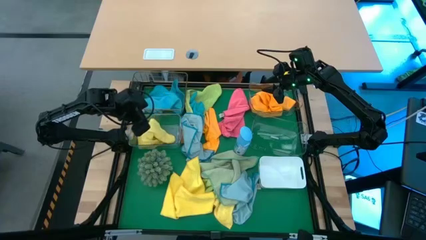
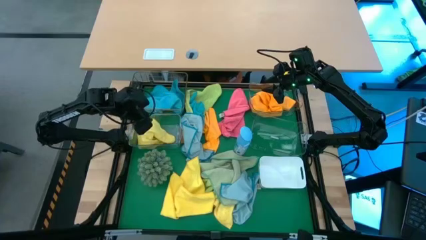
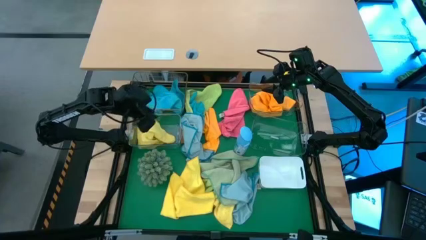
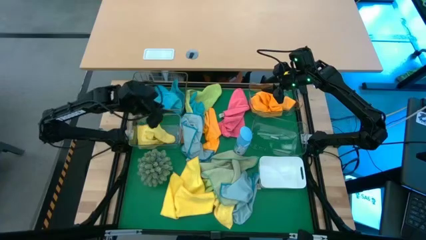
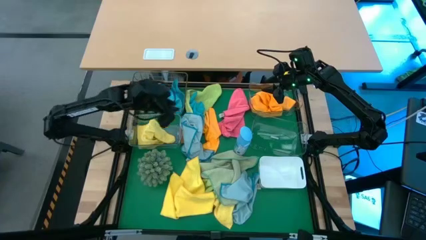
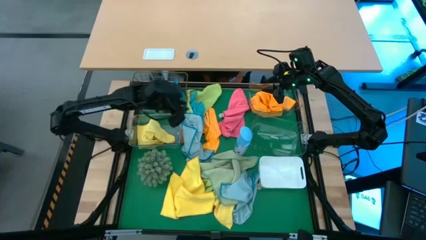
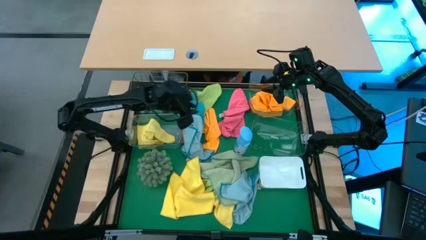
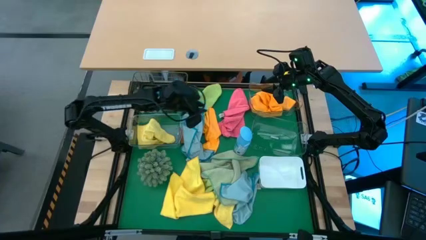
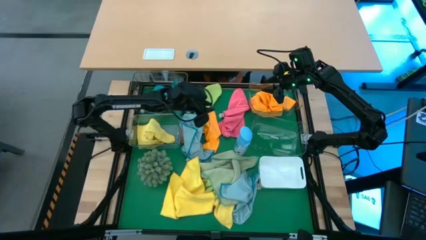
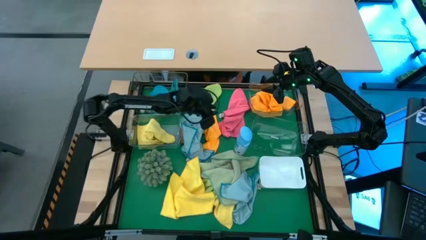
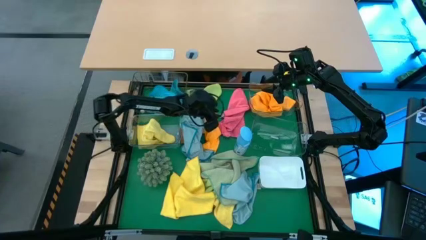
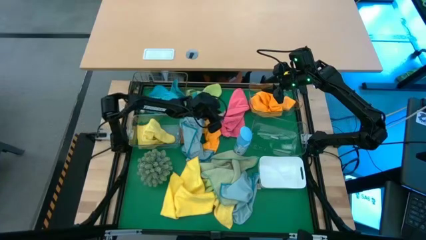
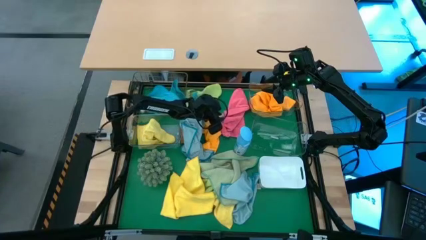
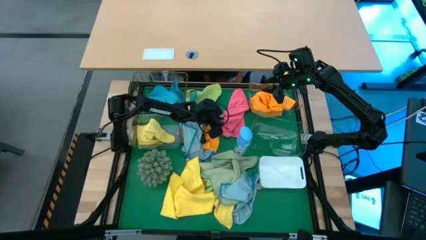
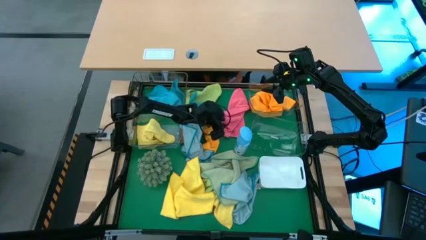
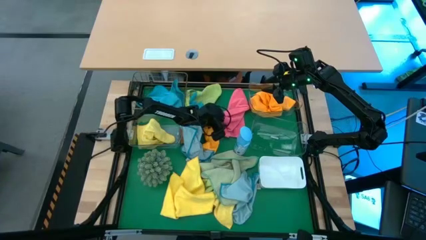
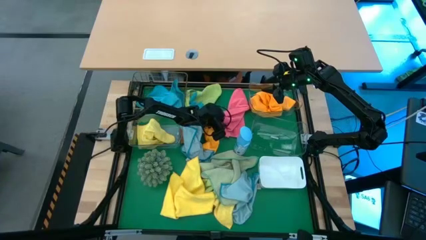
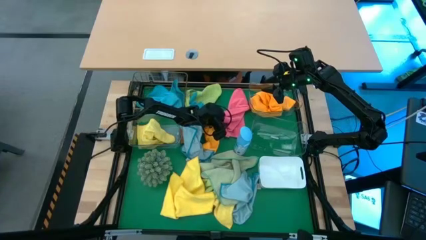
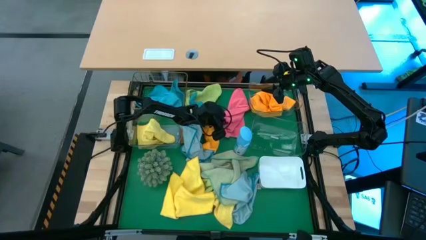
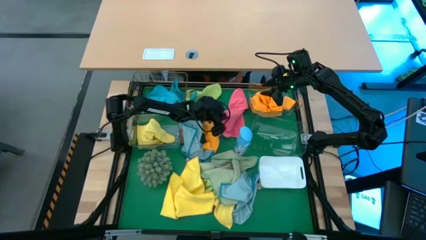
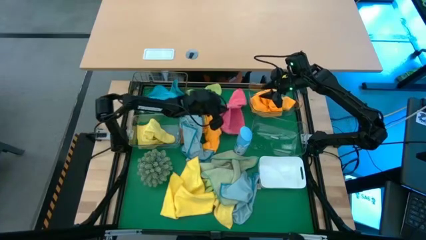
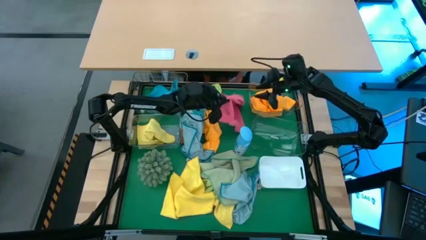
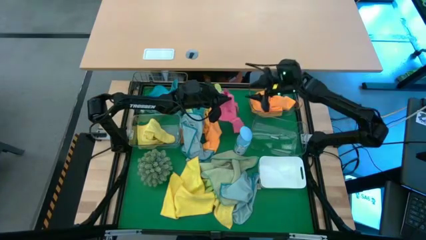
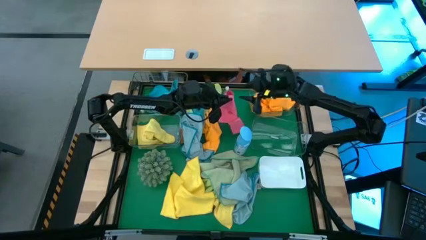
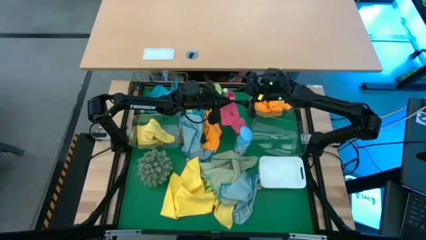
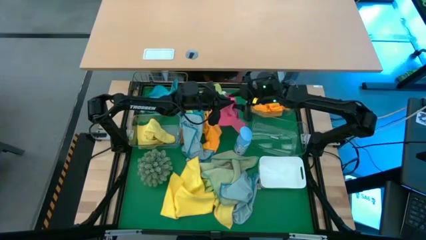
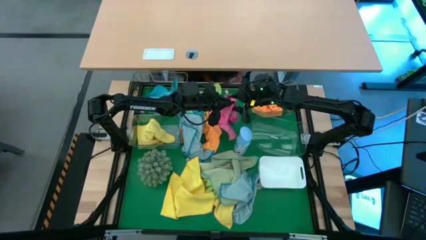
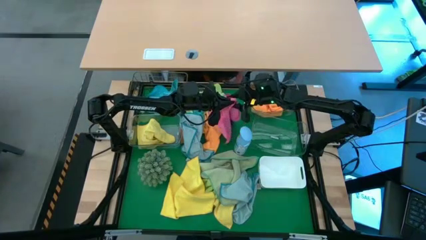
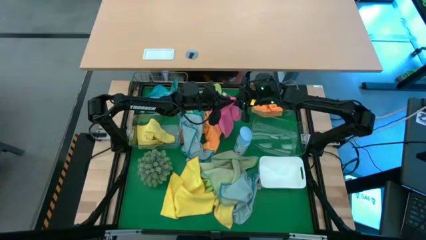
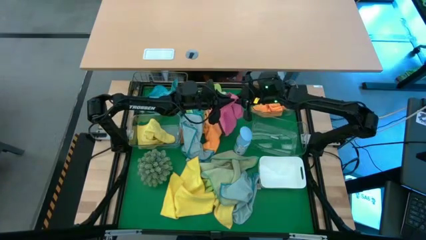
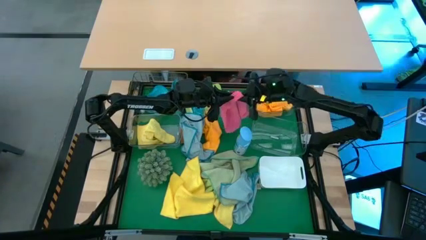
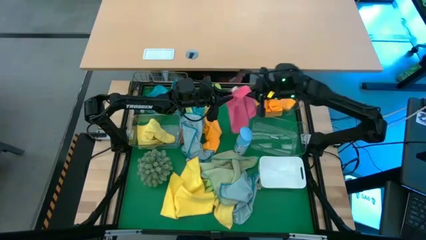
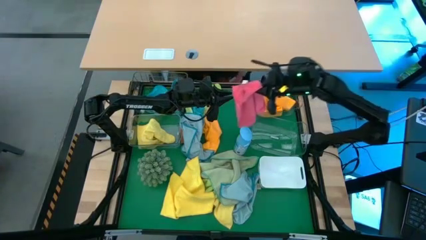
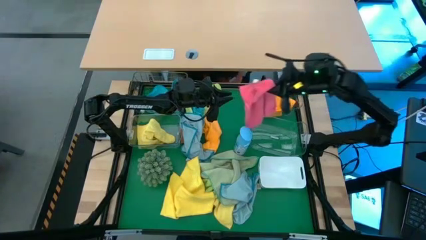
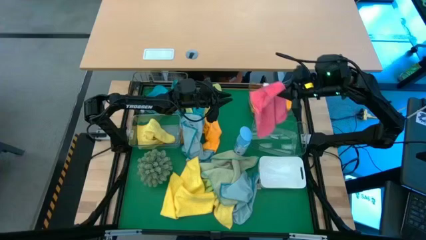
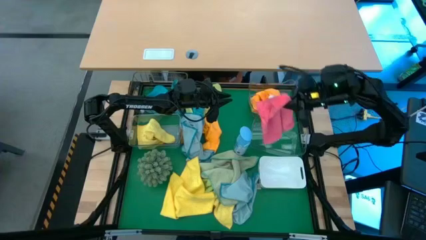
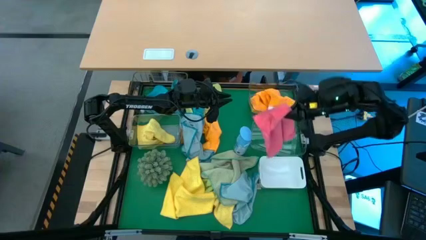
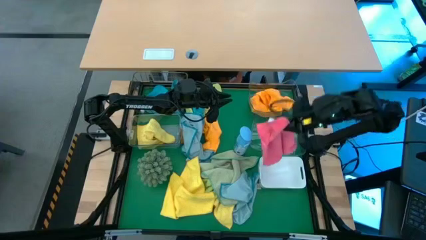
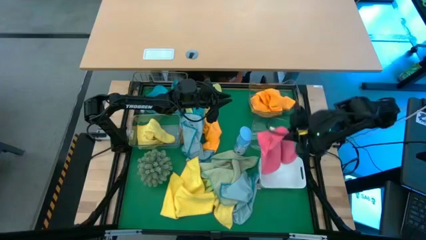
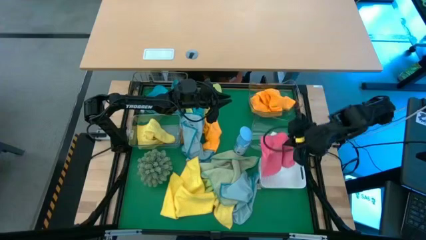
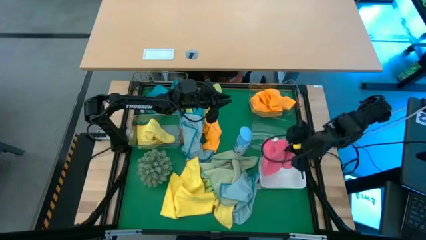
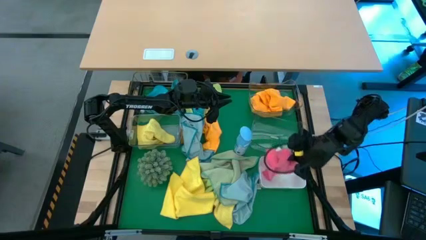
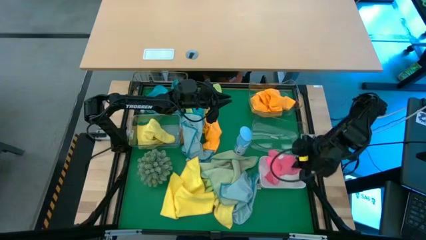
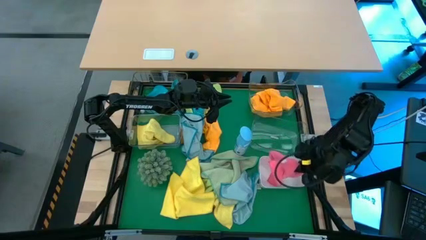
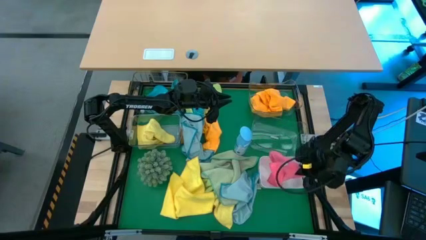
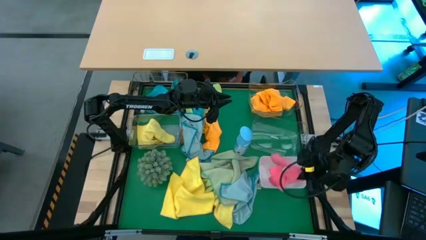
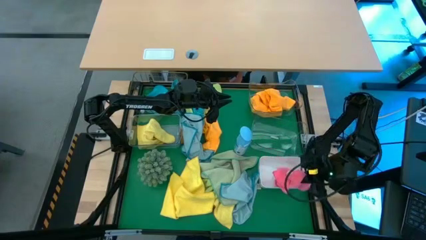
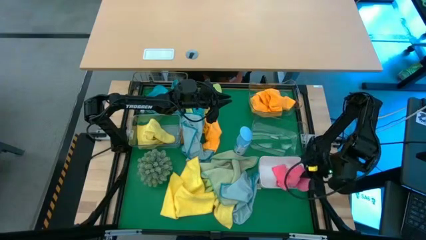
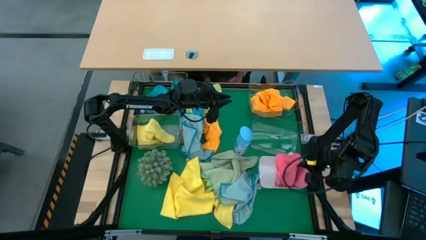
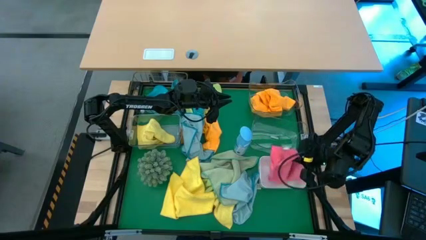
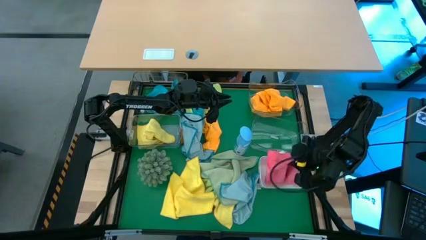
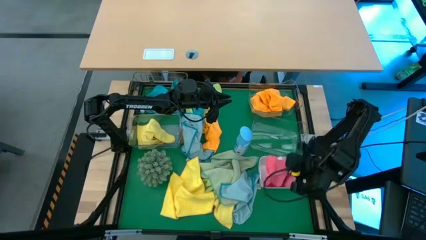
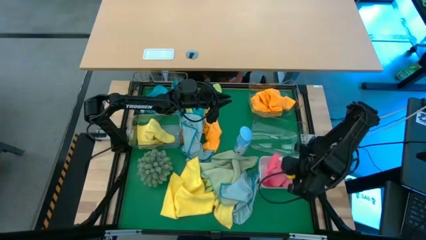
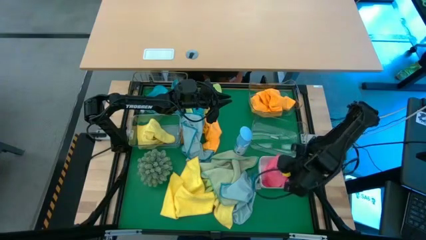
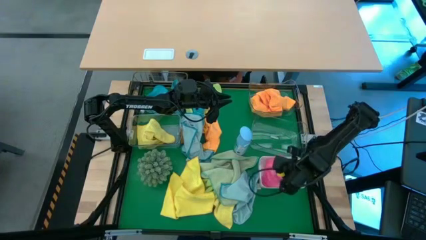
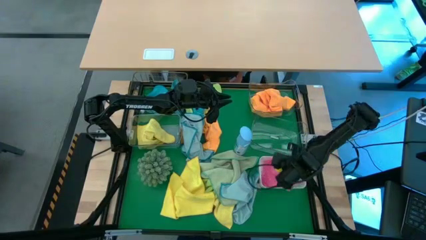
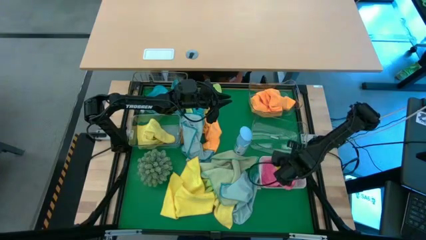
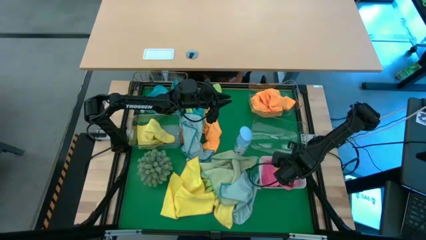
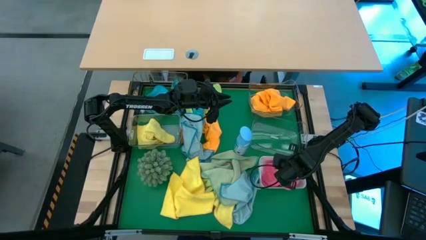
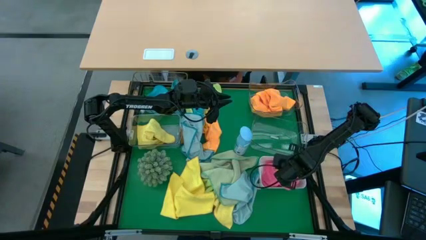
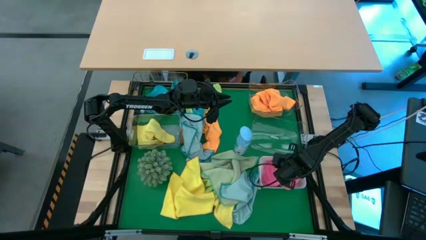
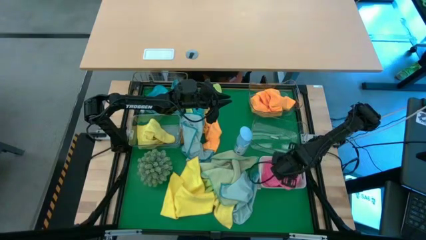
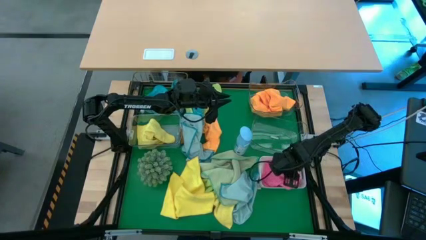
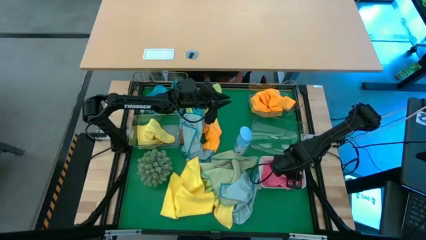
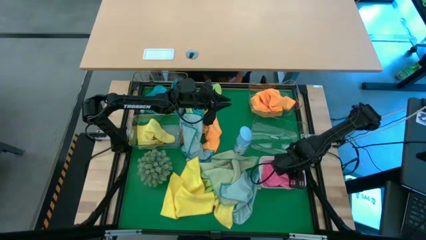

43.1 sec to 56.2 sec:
Task: Sort microfiber towel by color & place in baskets
Put the pink microfiber towel into the white bin
